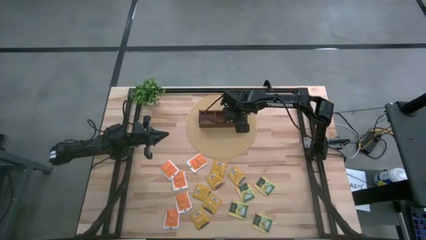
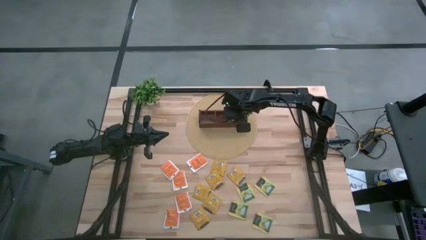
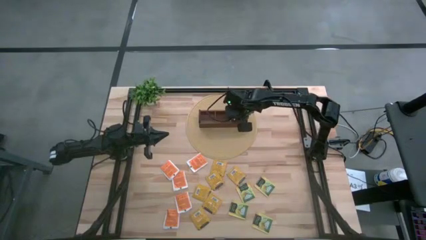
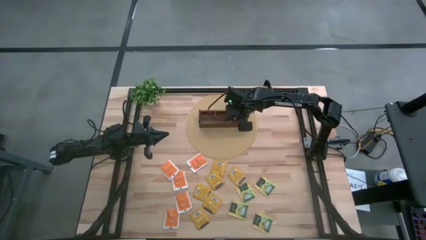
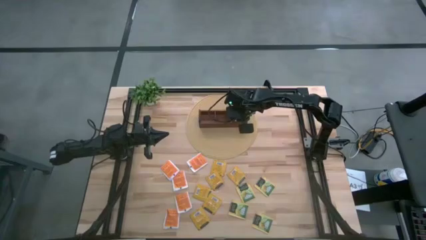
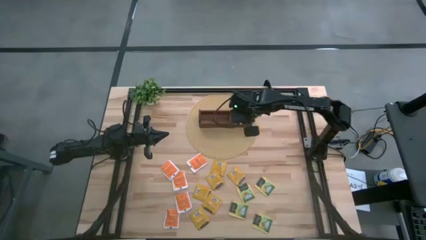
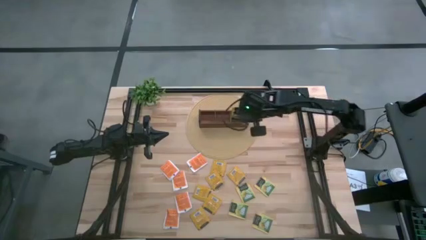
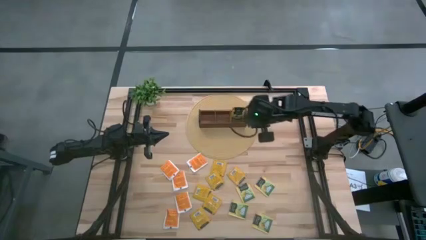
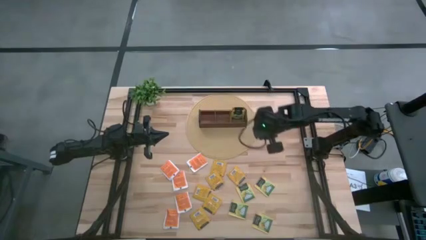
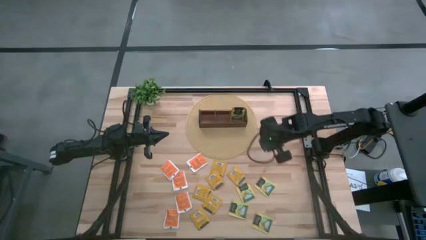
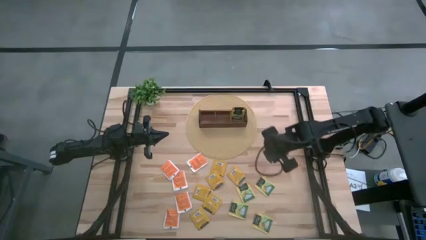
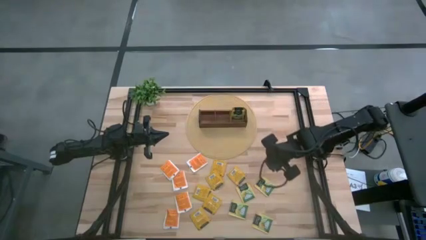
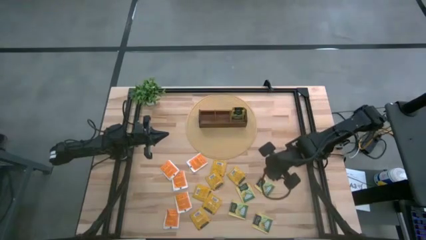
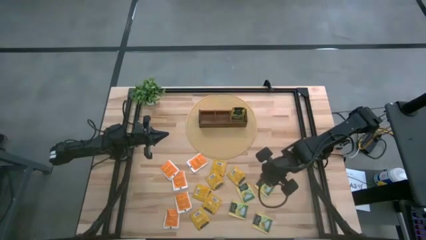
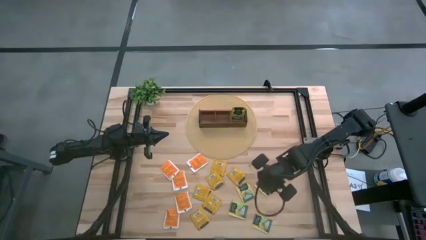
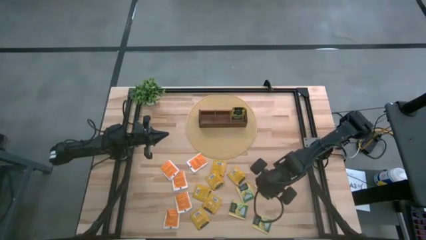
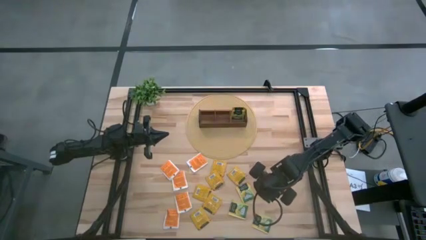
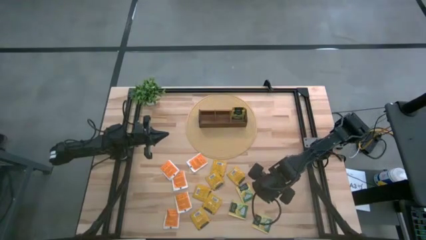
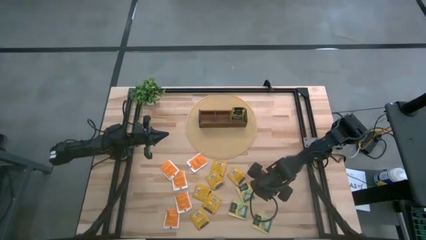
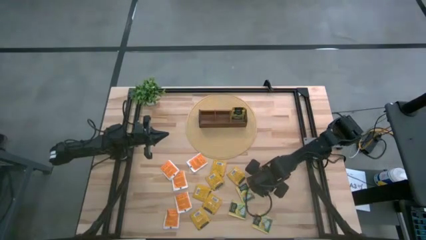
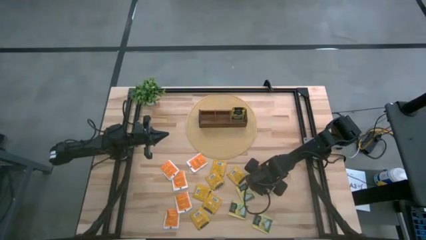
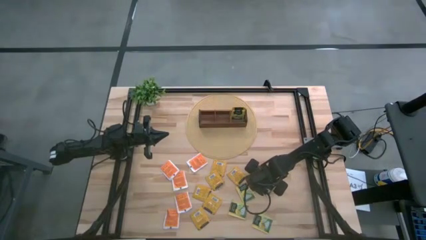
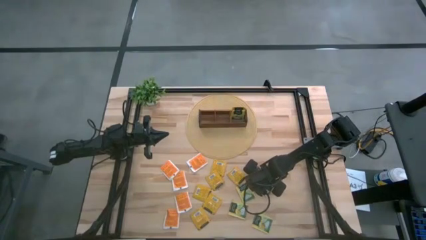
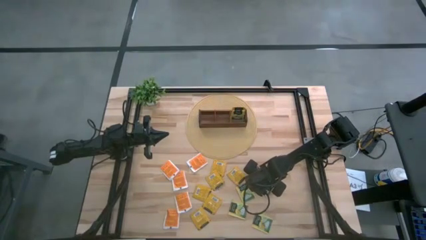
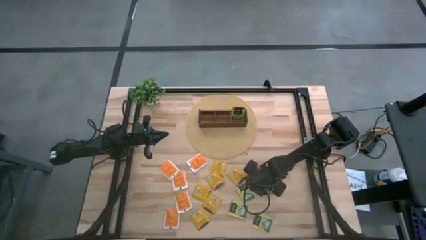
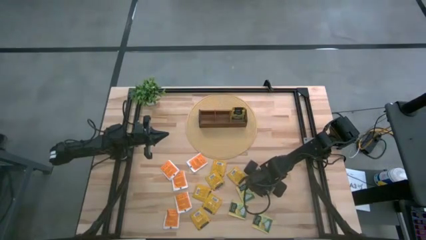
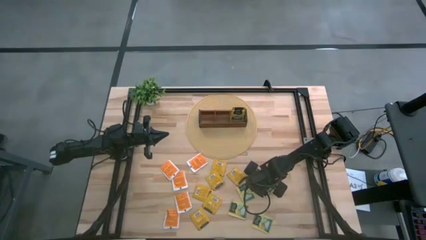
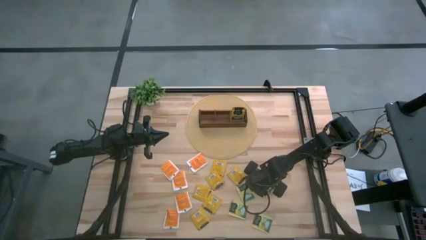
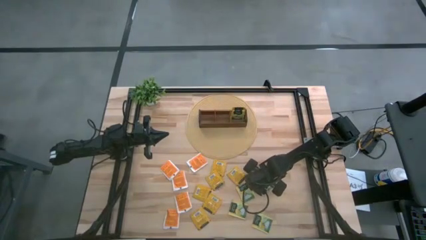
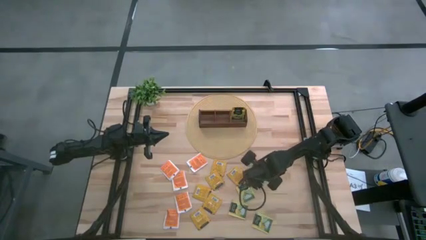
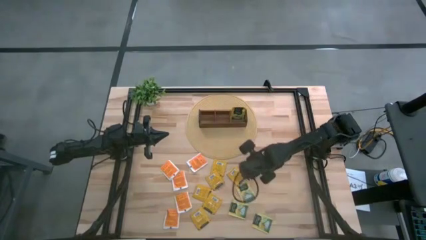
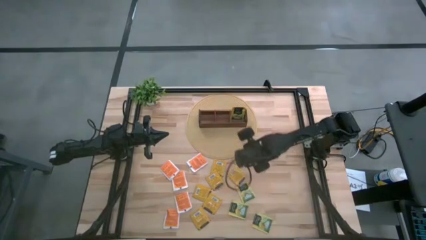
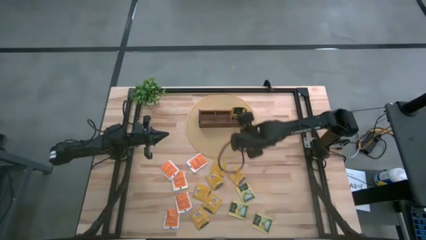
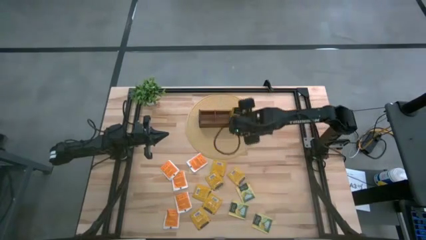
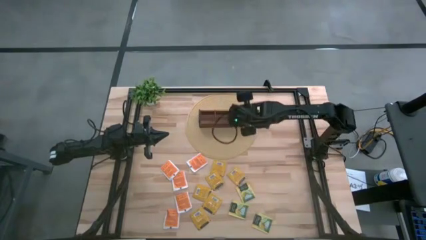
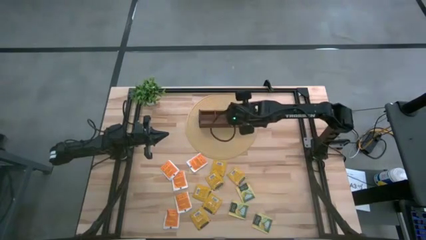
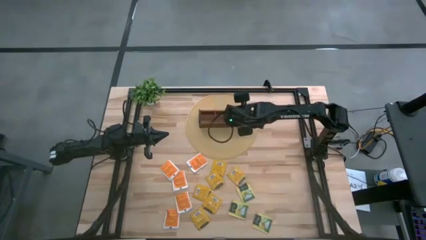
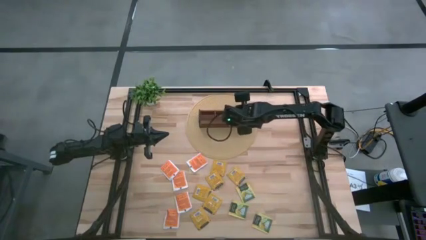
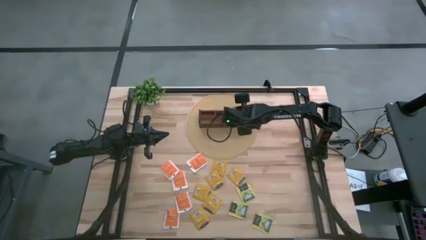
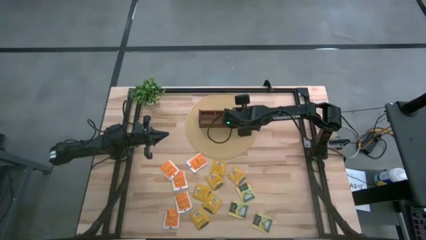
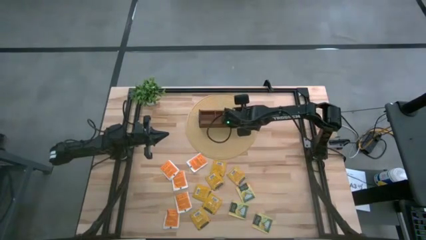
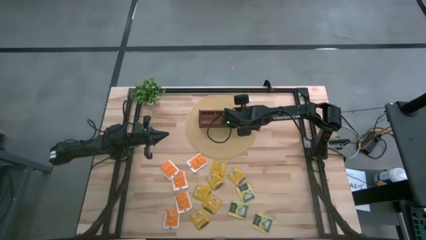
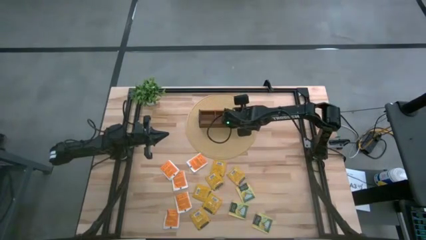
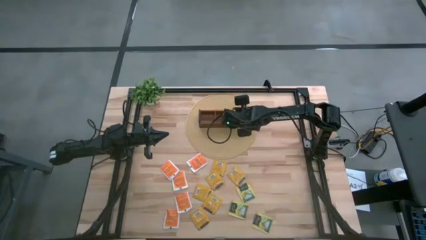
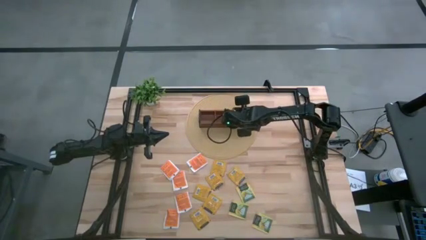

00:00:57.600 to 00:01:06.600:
Task: Pick & Place Tea
Put the yellow tea bag into the right section of the wooden organizer

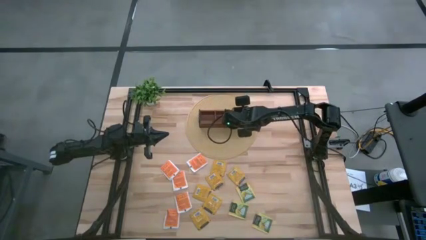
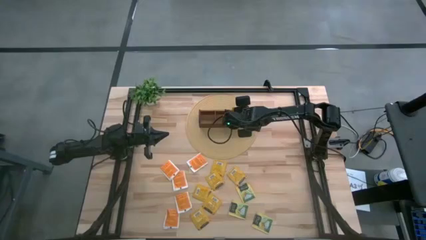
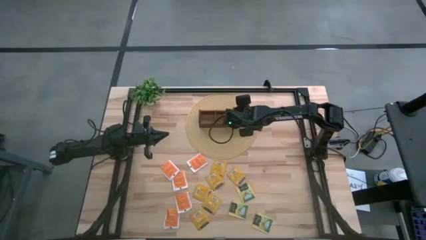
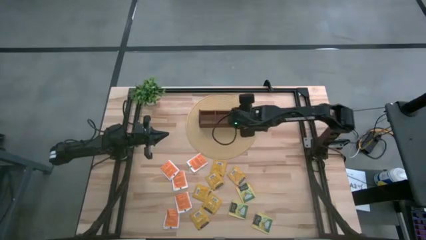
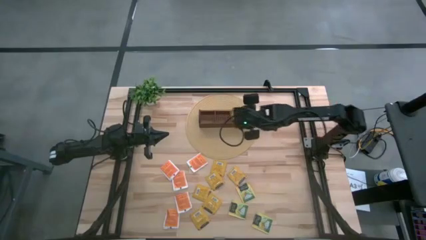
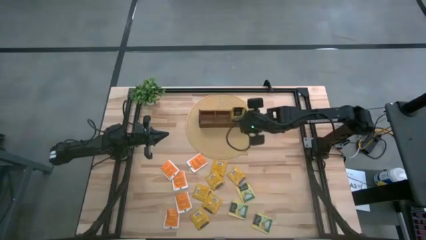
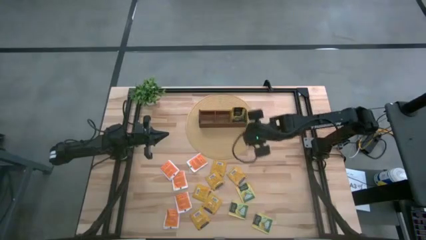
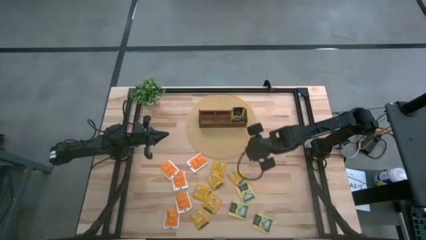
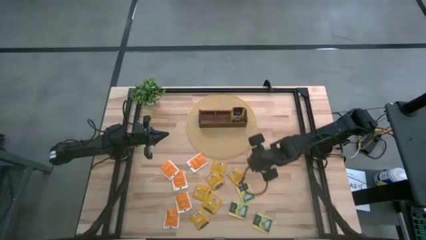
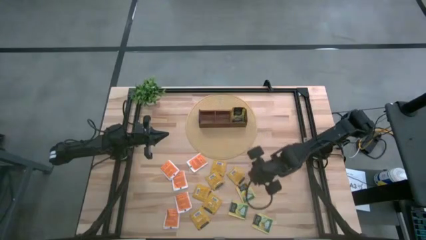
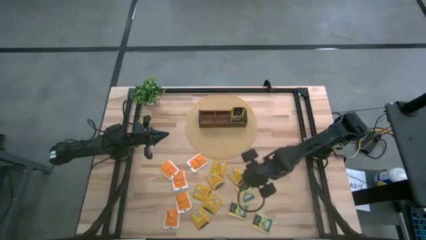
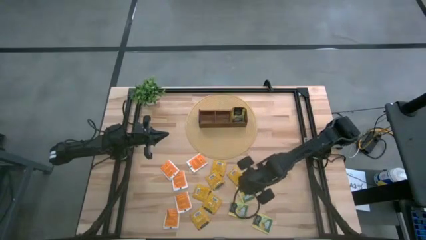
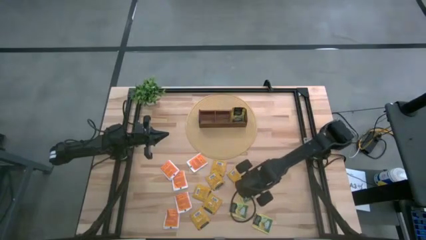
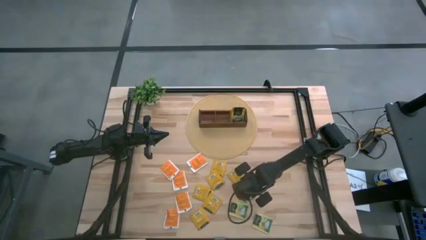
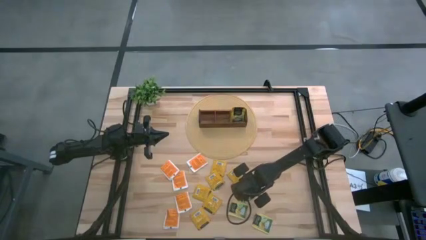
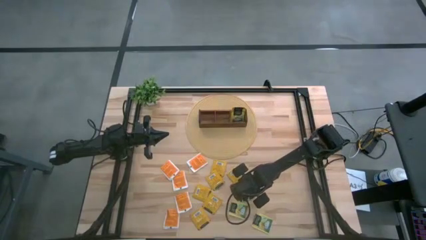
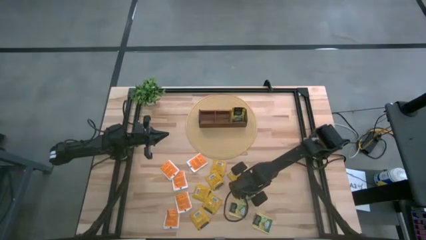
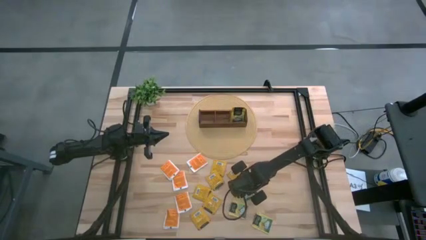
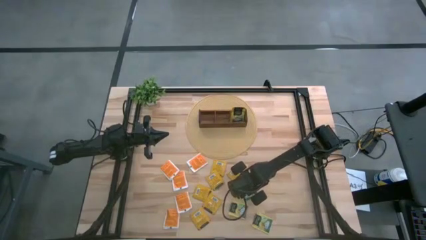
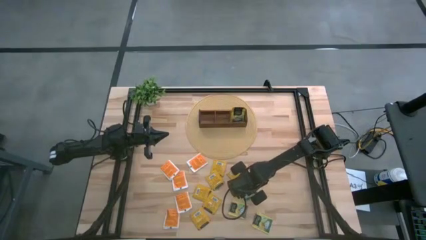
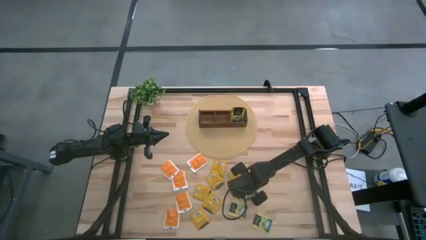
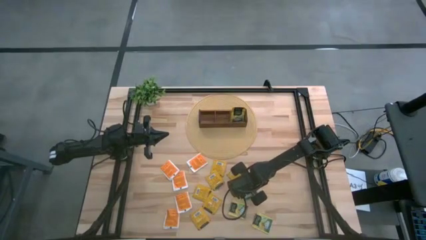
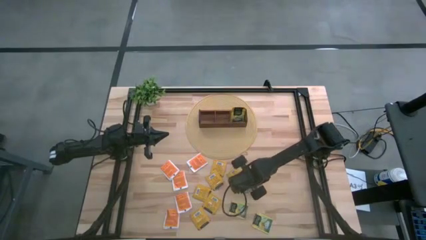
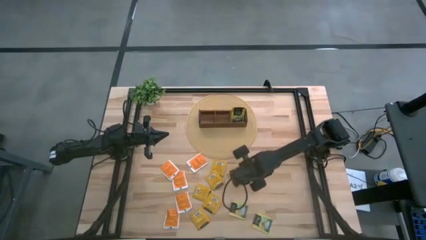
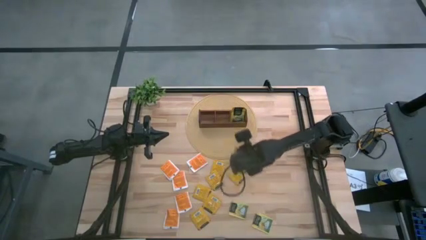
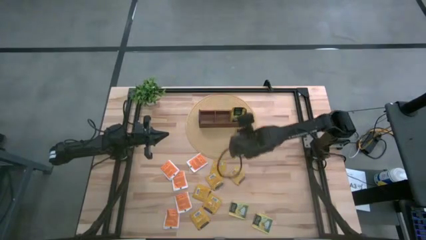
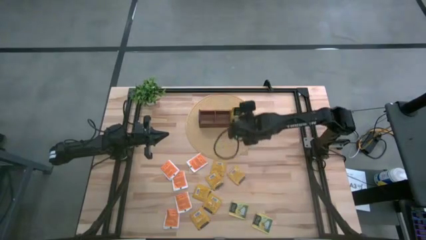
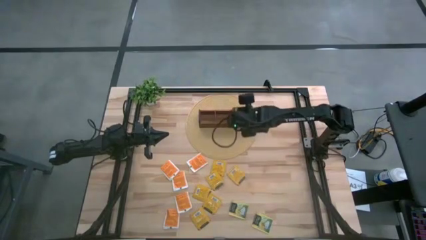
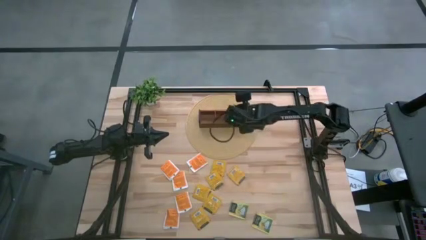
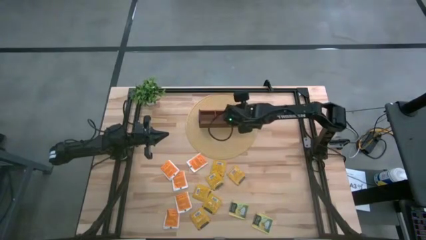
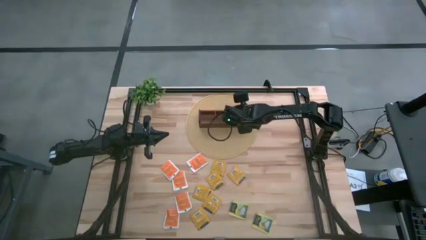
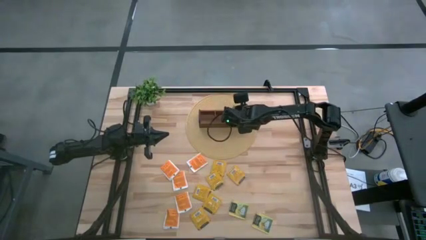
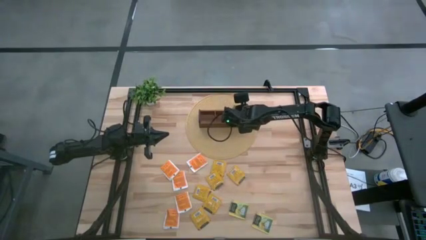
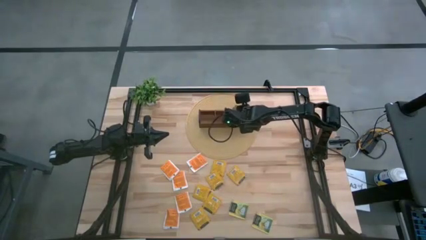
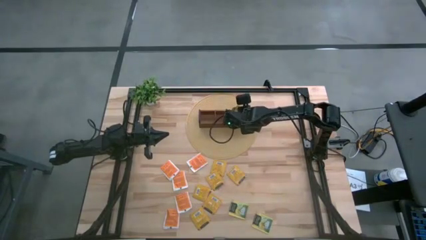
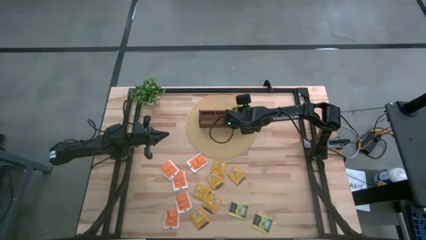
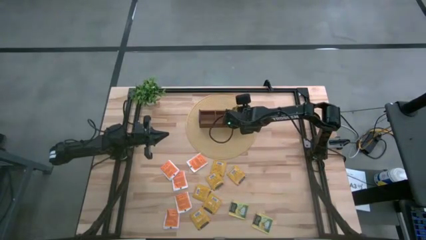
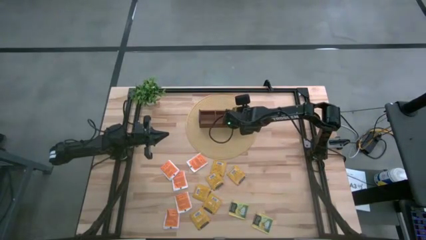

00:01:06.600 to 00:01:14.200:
Put the top yellow tea bag into the right section of the wooden organizer
